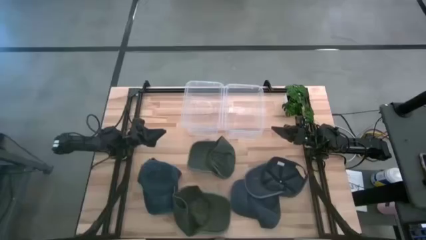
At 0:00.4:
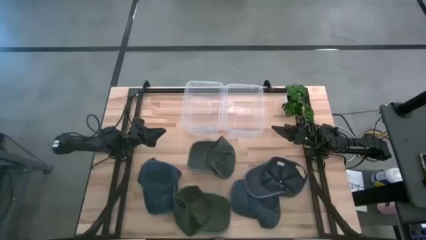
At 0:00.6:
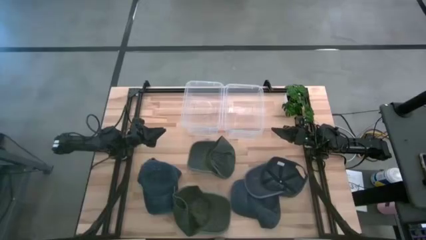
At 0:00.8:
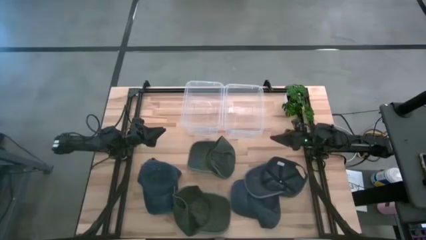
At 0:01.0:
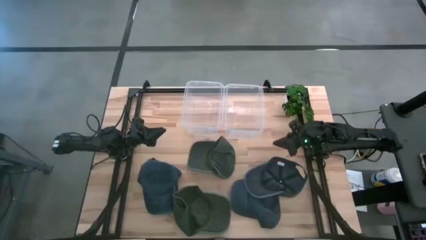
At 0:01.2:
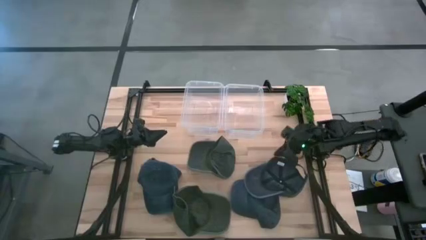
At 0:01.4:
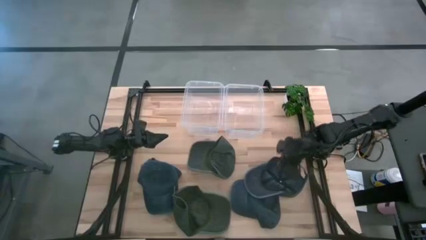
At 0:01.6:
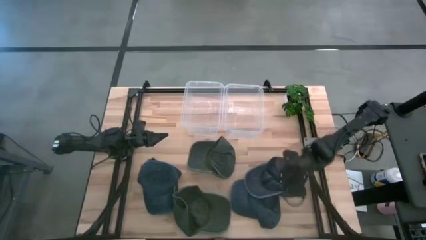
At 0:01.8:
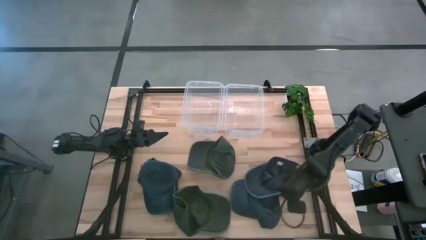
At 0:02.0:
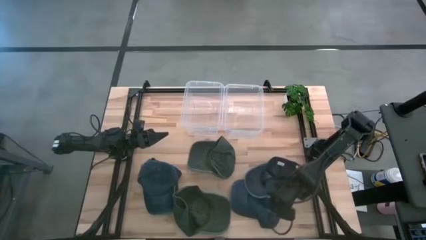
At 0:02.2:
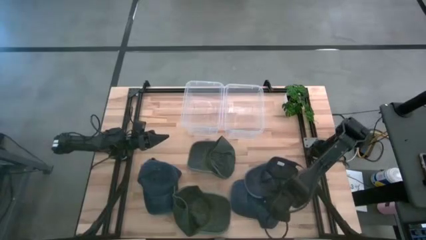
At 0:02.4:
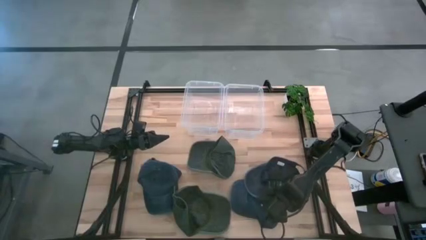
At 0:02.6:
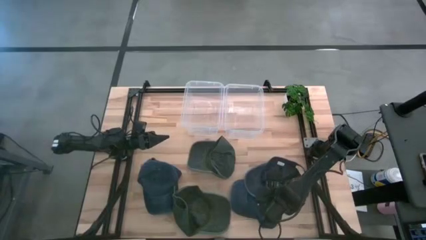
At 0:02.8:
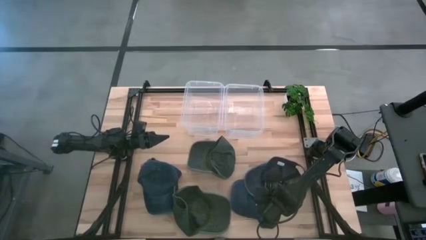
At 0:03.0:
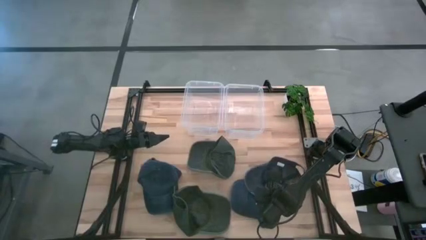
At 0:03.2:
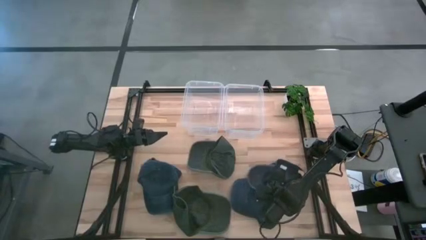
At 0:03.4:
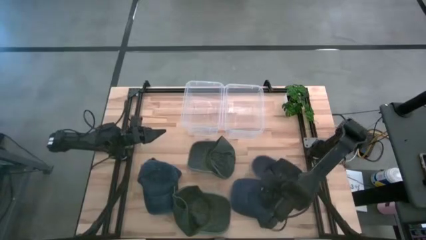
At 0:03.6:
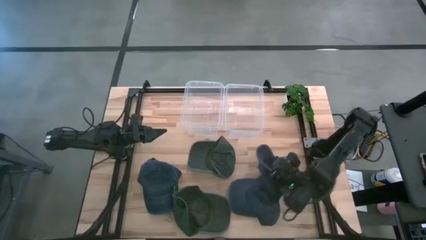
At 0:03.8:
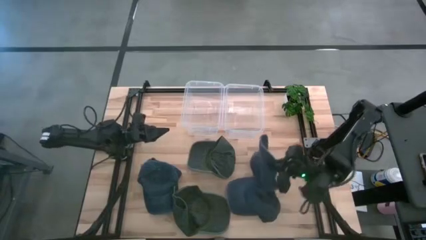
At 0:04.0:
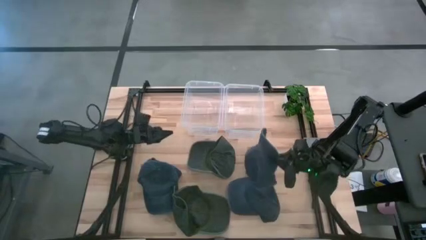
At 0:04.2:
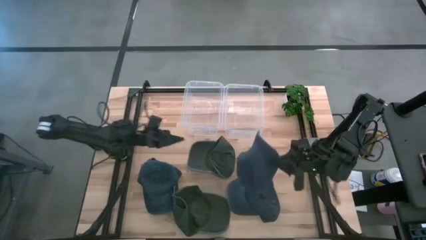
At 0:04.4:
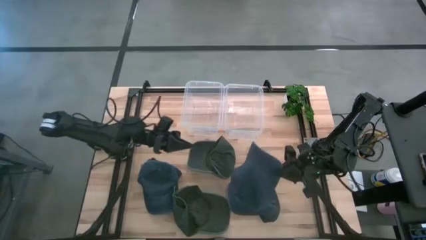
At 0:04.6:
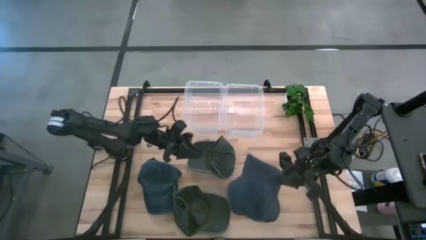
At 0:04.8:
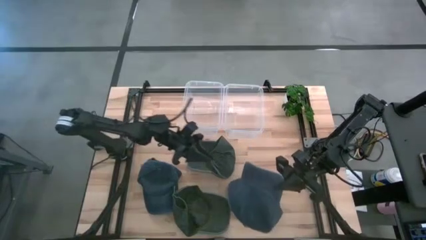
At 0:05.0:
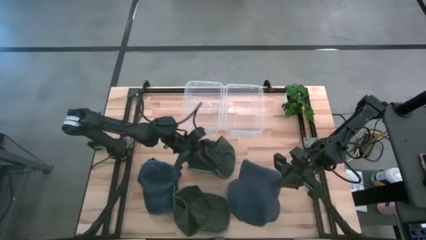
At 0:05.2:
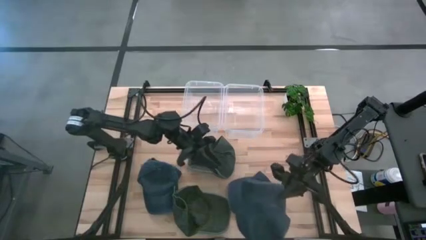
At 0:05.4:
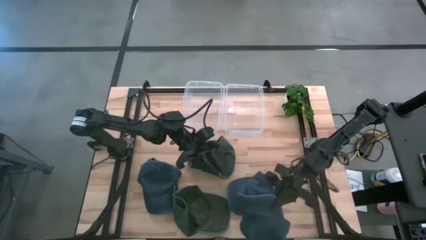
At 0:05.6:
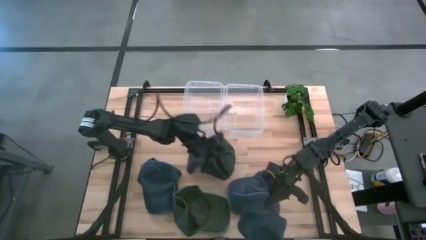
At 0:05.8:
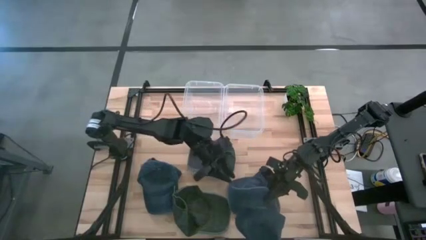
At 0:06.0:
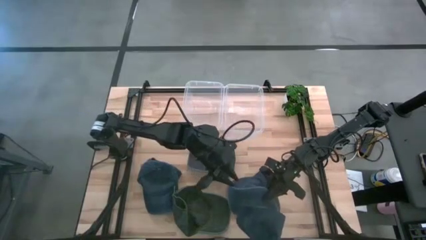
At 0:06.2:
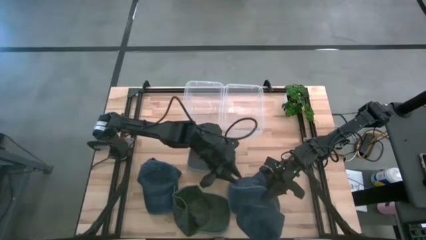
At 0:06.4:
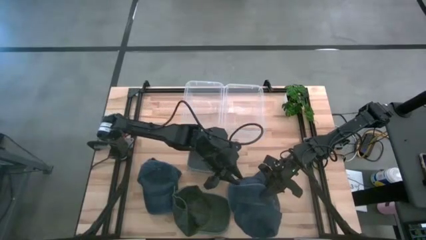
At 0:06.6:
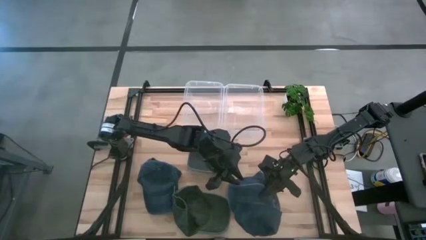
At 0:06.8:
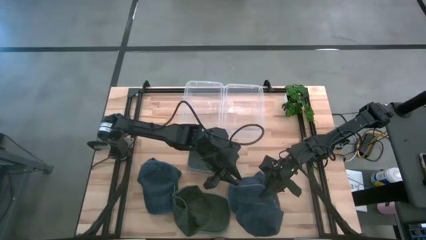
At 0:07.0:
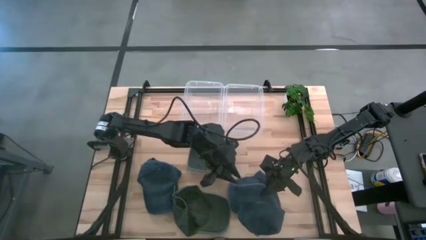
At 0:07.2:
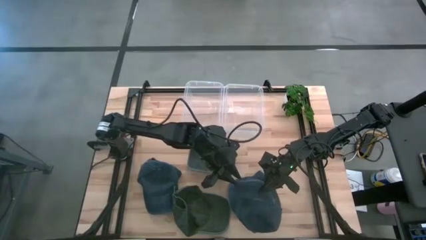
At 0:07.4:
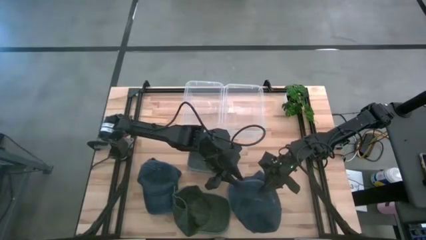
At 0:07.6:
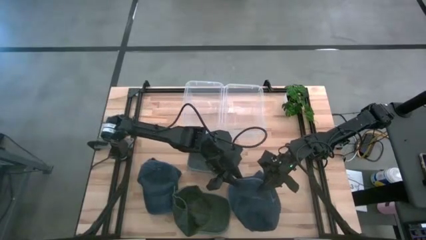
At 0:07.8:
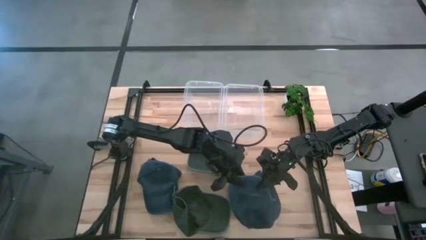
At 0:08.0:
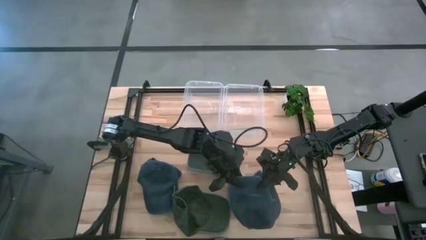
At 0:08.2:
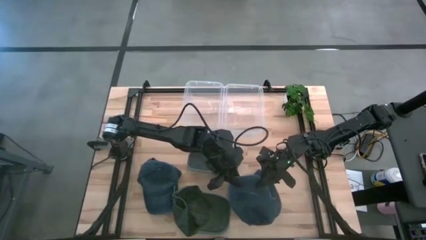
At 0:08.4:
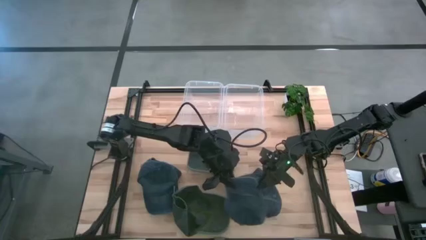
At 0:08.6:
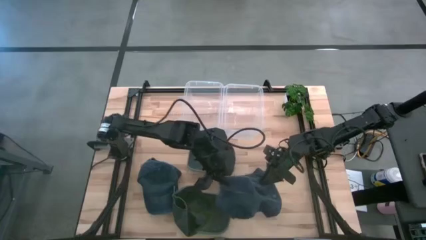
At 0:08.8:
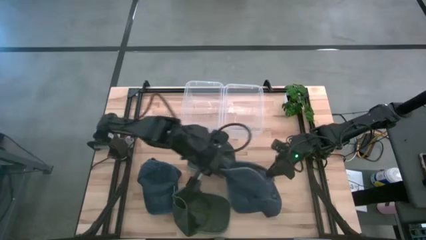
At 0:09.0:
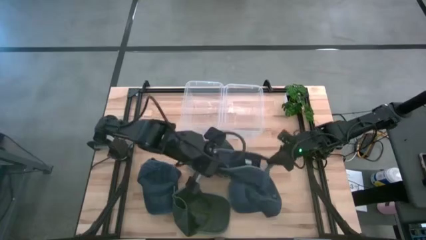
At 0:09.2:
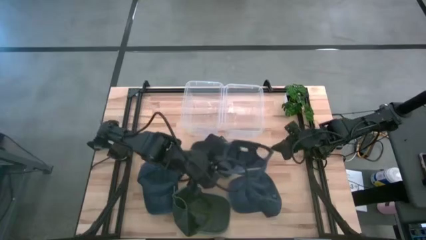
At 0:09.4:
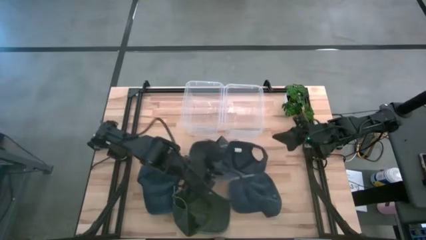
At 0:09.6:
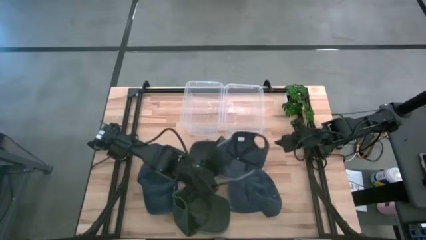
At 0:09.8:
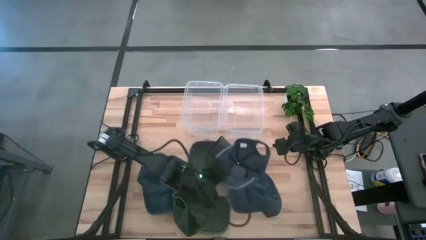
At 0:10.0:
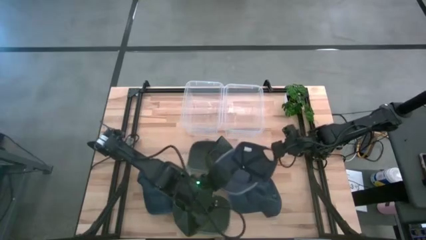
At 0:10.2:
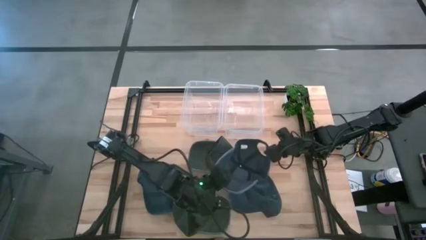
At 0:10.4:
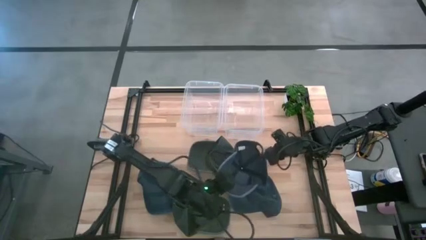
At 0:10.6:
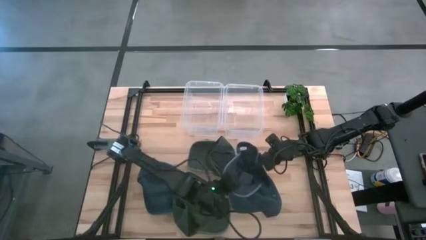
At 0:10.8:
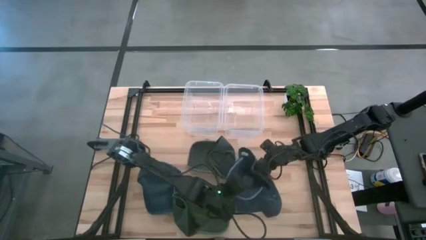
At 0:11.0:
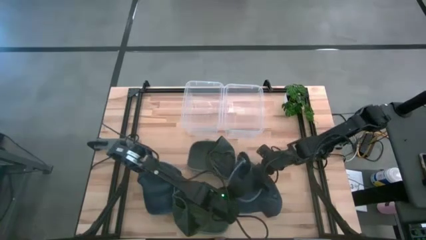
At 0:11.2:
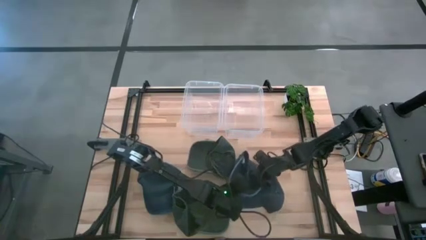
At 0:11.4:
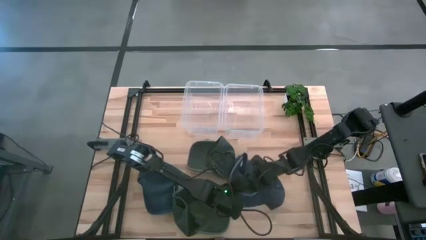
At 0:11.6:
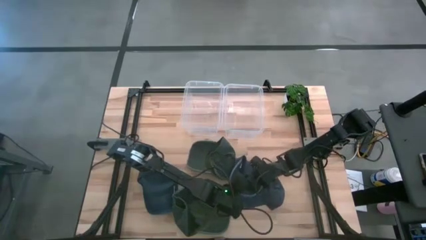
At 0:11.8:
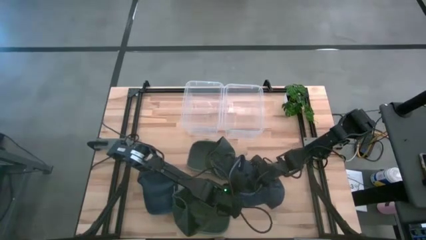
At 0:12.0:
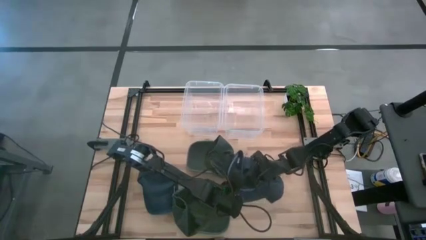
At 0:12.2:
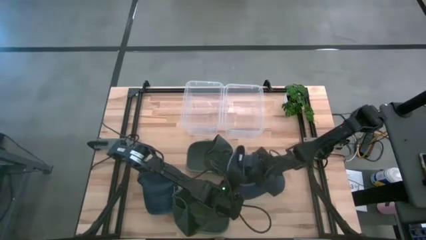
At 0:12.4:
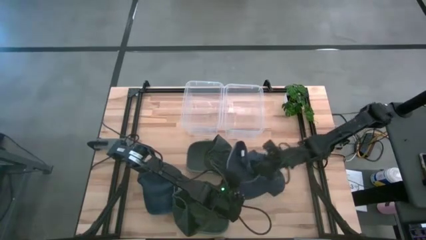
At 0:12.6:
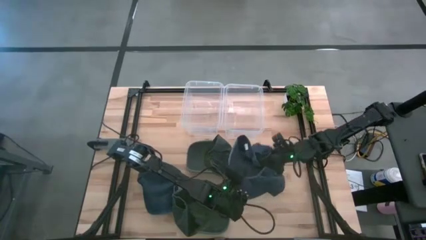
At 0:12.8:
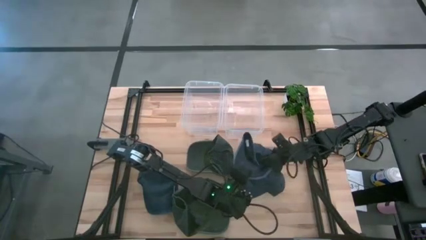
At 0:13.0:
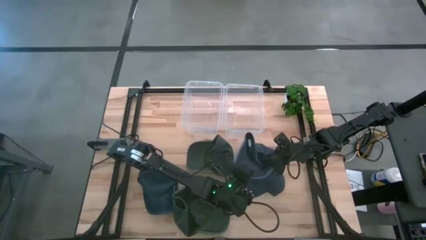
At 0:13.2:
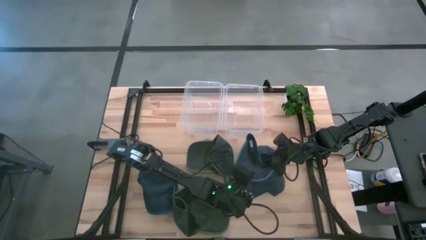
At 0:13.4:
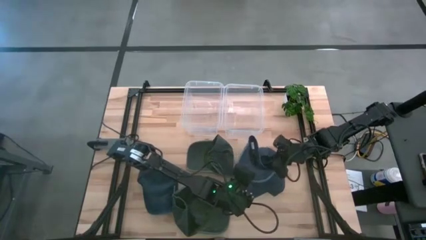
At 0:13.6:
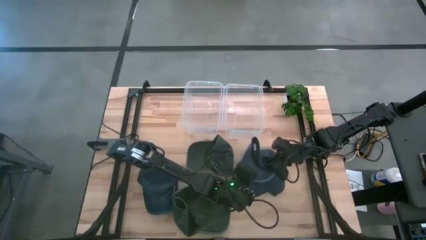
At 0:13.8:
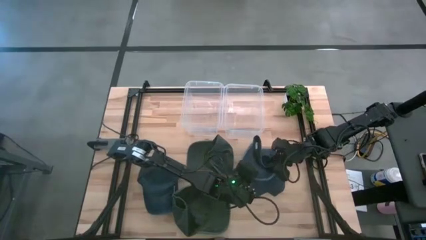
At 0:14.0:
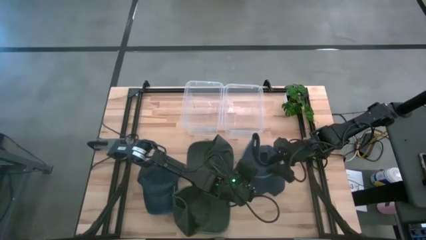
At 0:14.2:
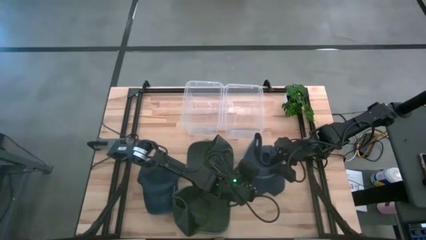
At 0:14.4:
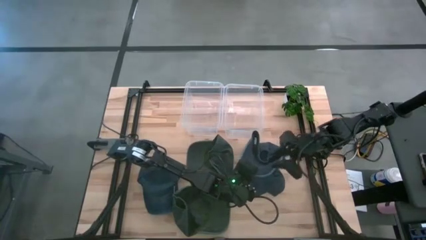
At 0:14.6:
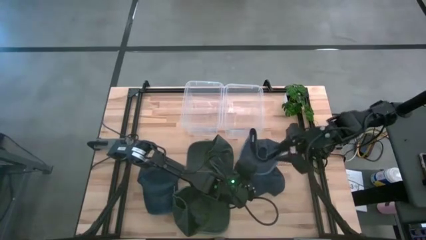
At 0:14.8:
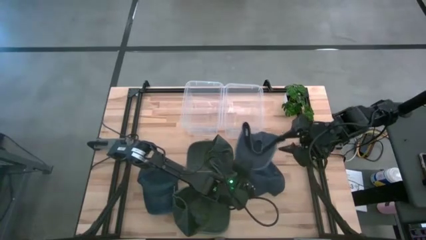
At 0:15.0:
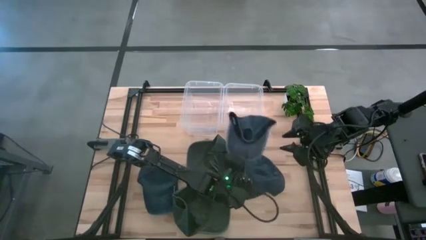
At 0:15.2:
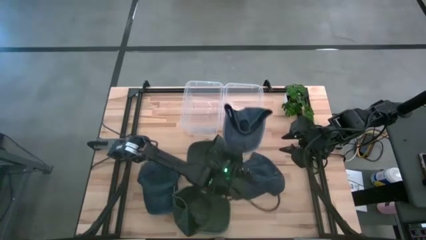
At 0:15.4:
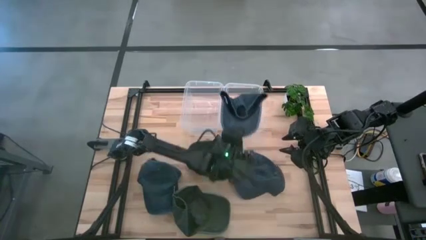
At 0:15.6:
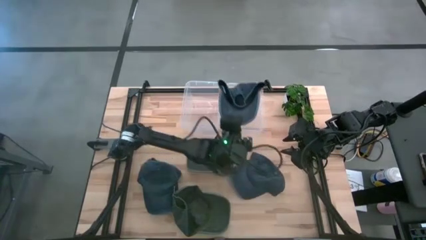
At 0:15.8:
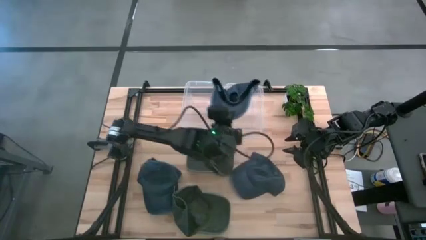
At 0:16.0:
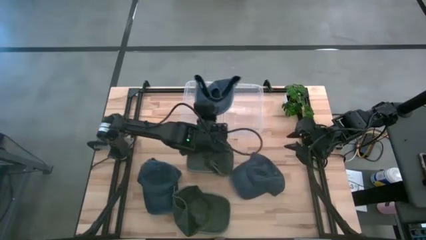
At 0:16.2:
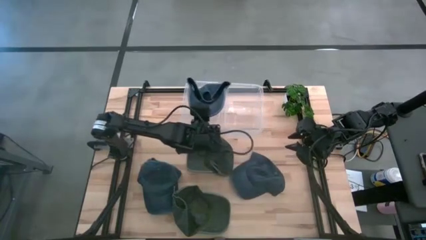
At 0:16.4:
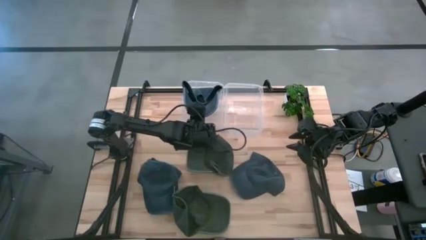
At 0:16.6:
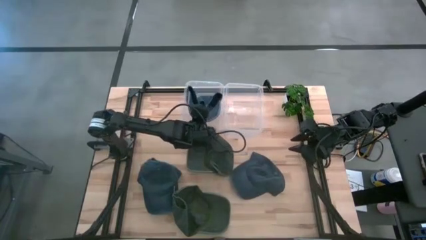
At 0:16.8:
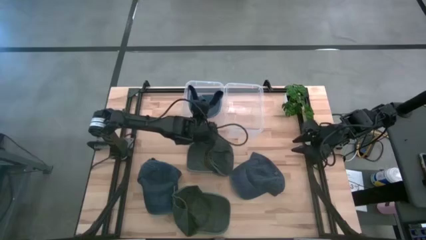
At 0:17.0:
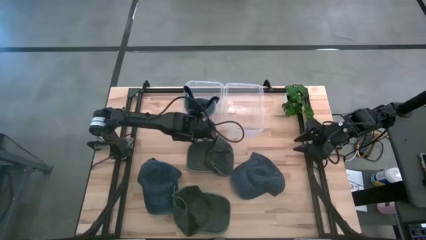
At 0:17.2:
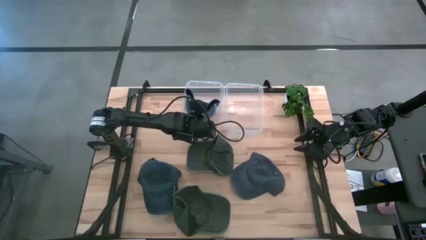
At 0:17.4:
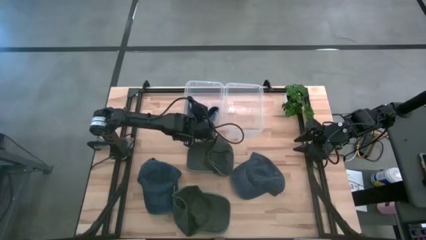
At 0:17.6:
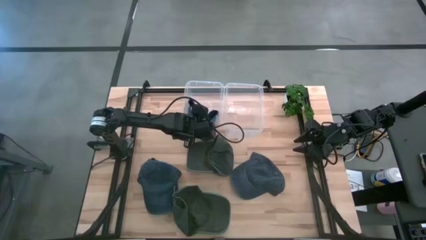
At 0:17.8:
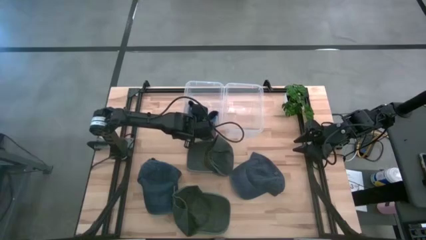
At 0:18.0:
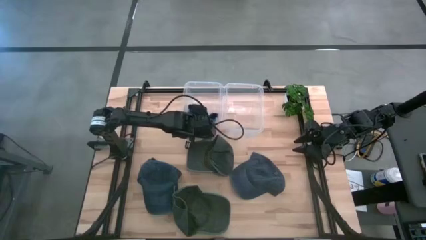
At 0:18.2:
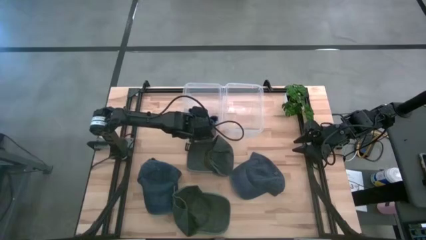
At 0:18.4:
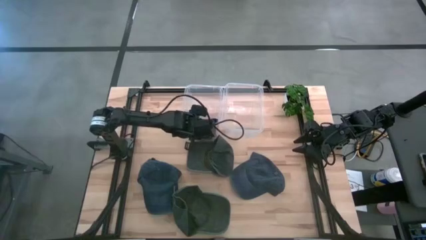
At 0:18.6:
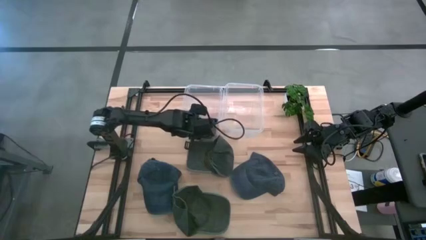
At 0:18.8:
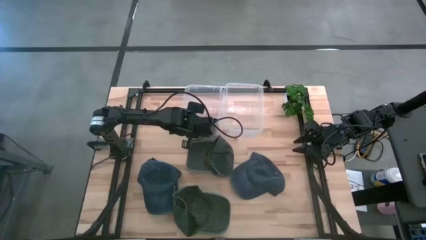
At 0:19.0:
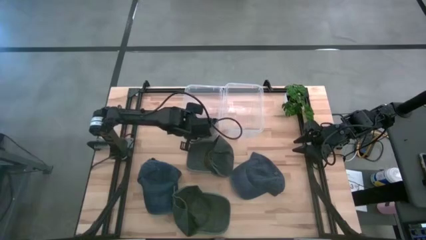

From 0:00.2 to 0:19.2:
Task: Pick & Place hat
Put the top right blue cap into the left transparent bin
